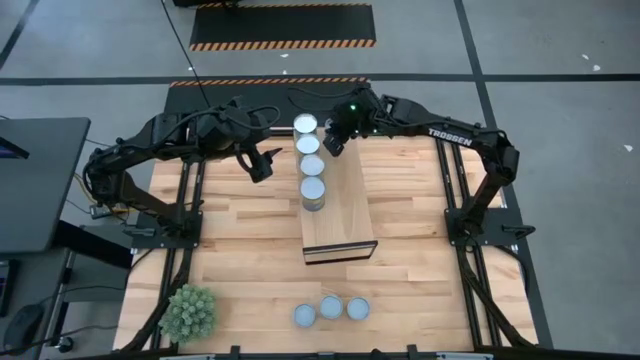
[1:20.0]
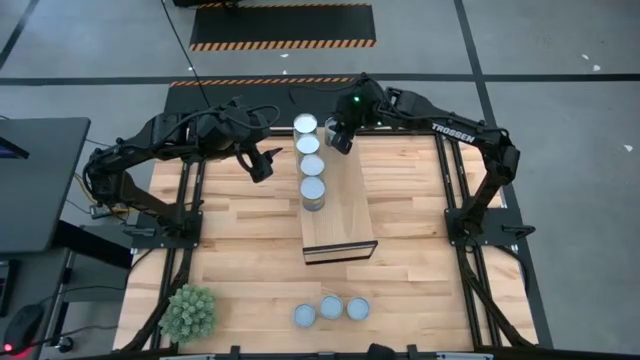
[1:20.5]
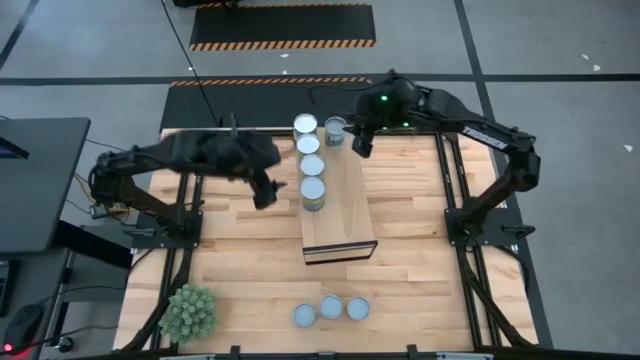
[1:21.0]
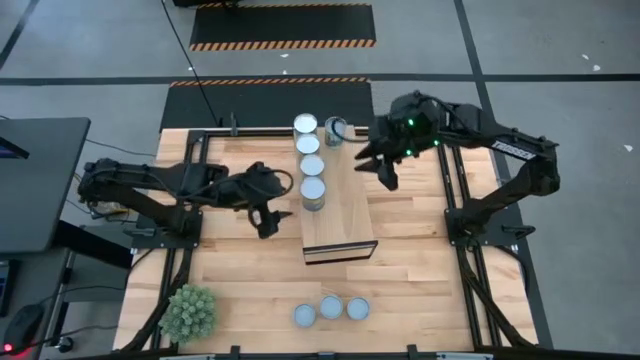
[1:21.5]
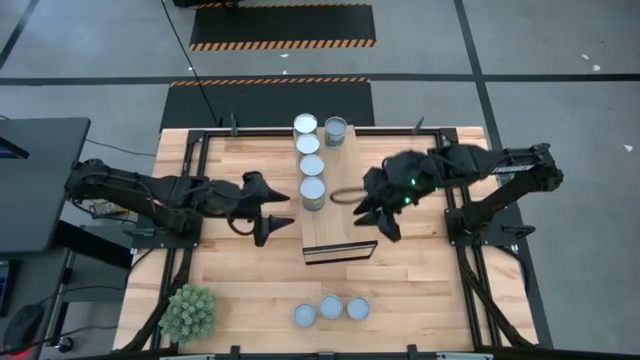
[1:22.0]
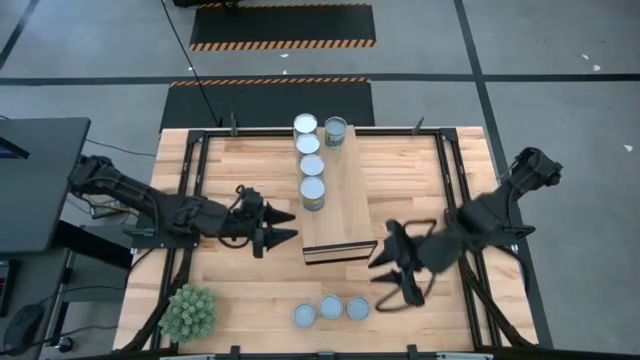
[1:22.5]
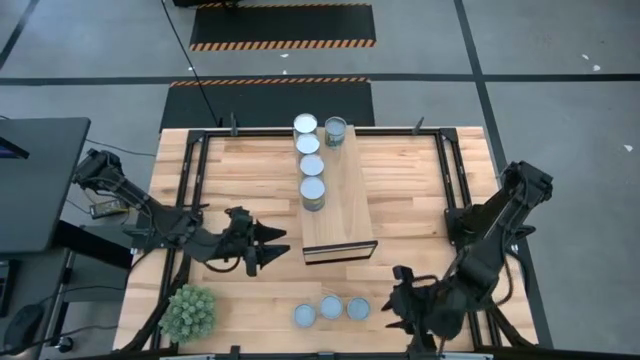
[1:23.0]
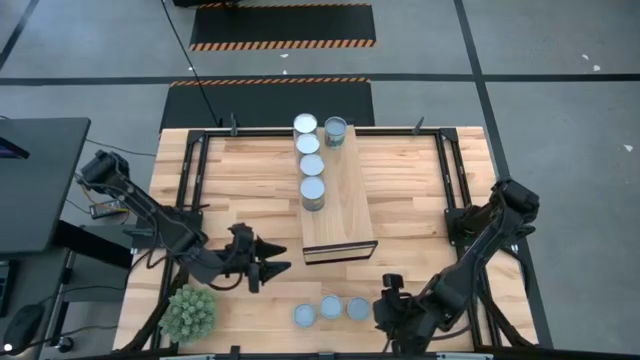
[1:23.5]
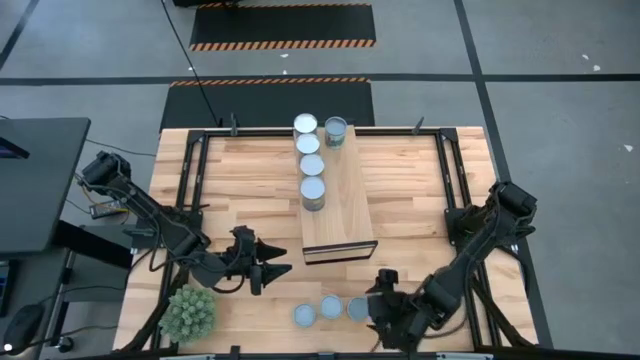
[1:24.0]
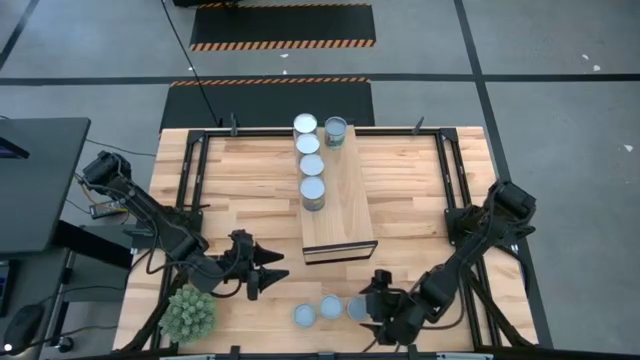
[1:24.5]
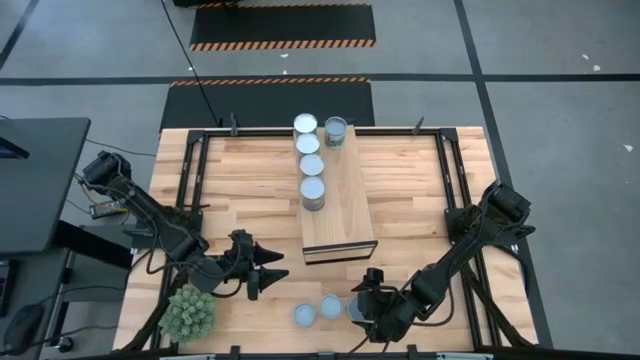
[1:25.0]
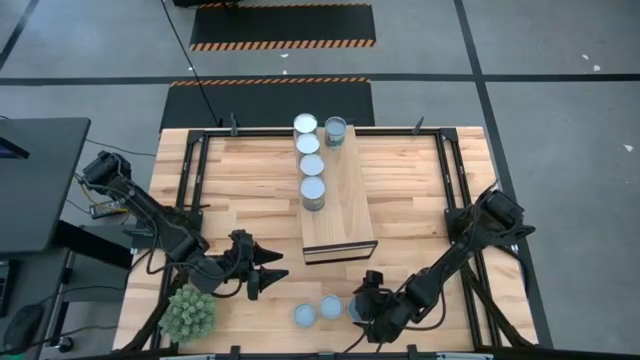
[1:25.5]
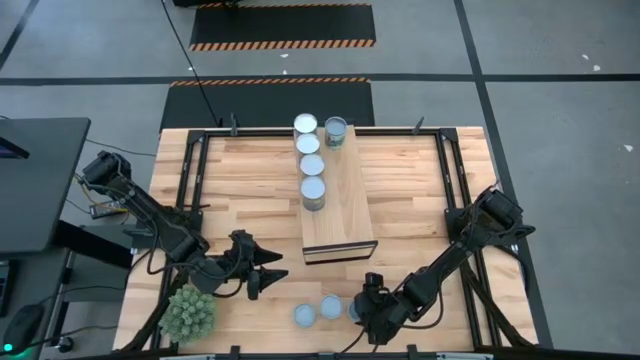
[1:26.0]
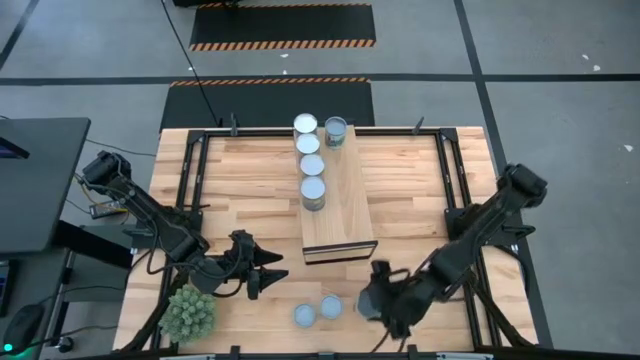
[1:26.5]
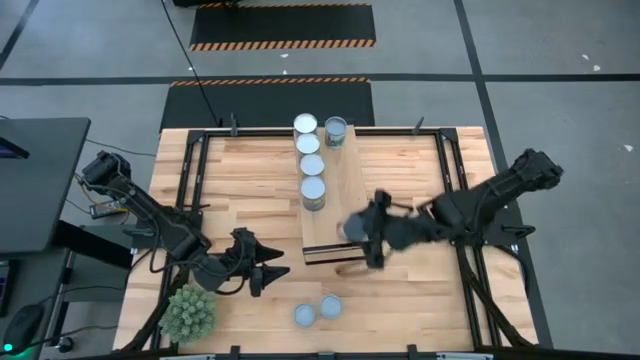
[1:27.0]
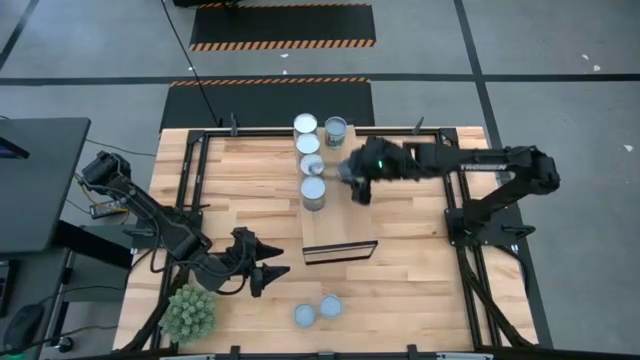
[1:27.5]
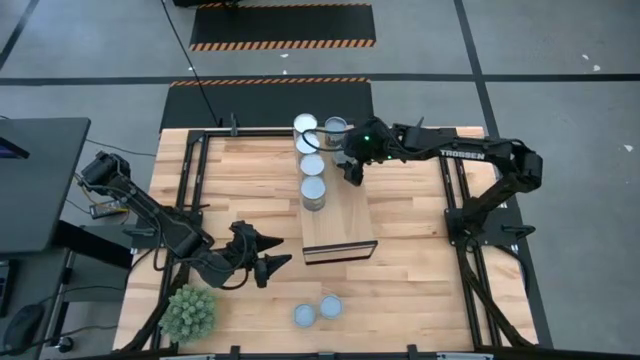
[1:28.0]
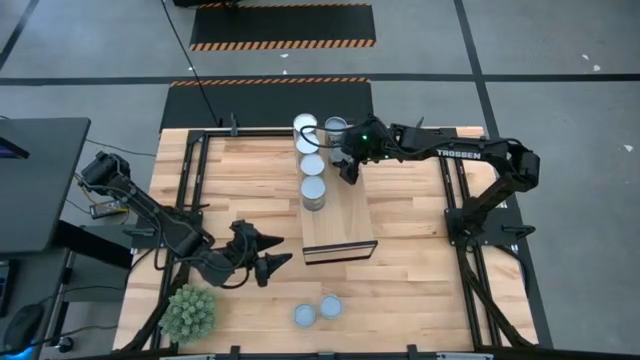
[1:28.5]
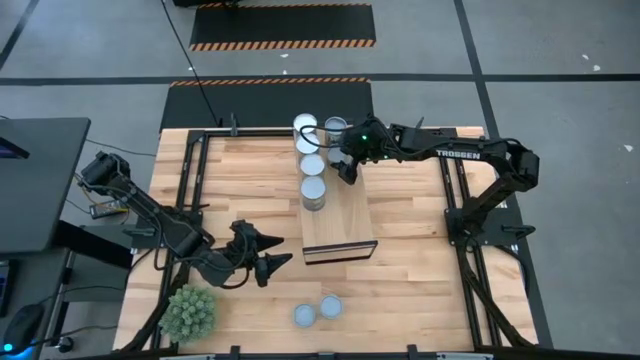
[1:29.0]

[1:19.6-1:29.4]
Task: Pick and place cans onto a shelf
Put the canned diced tomatoes on the shelf

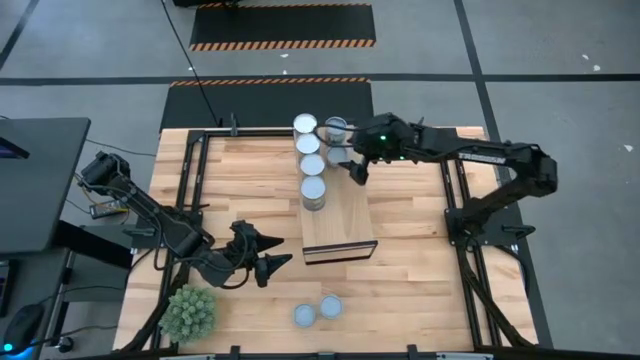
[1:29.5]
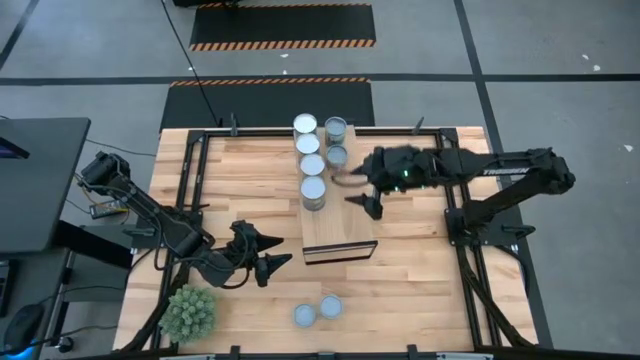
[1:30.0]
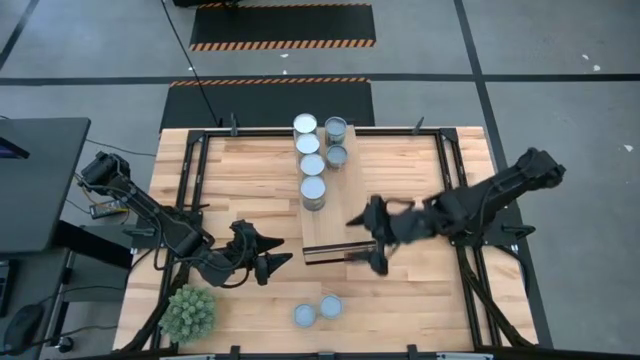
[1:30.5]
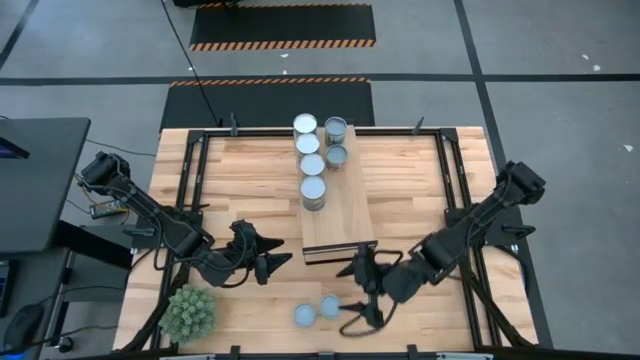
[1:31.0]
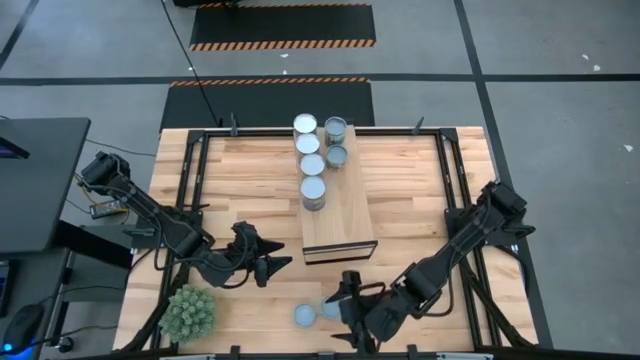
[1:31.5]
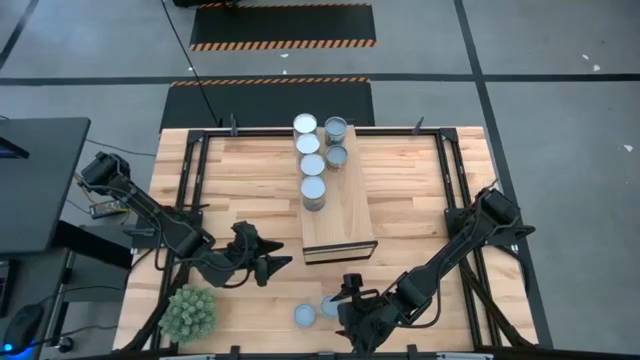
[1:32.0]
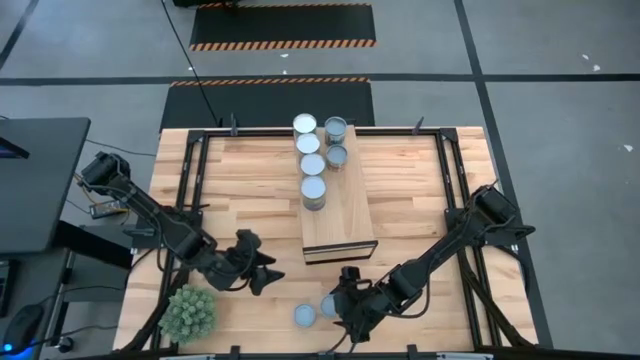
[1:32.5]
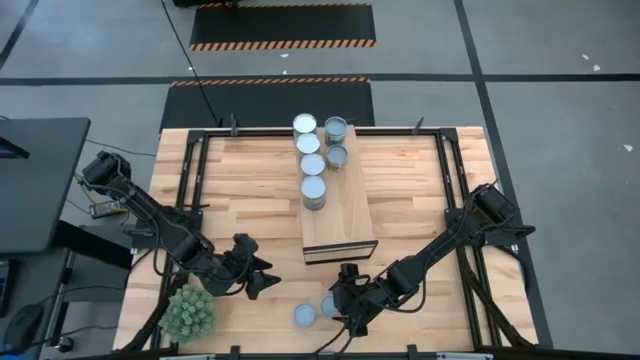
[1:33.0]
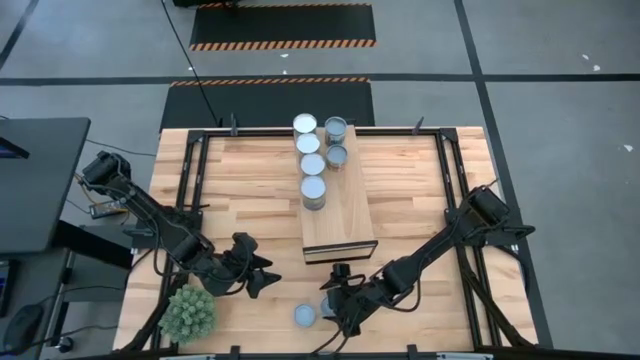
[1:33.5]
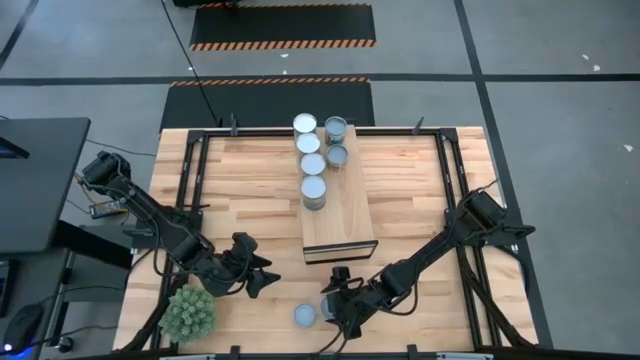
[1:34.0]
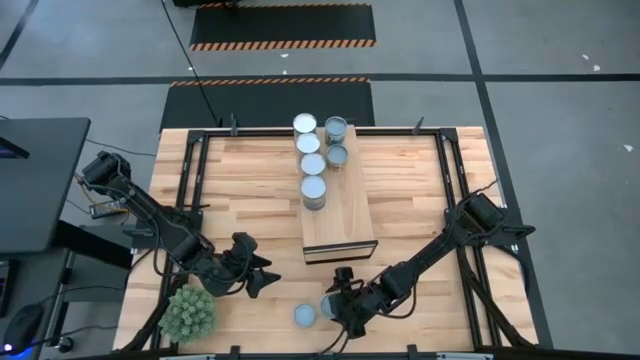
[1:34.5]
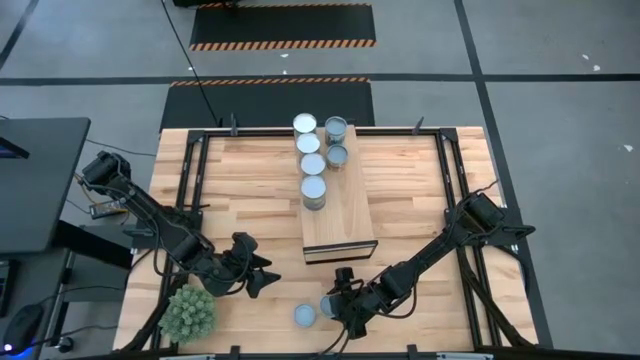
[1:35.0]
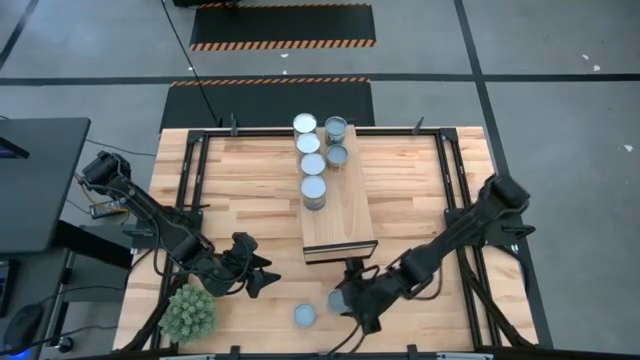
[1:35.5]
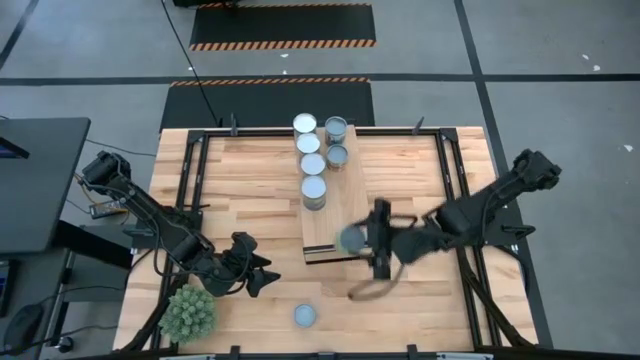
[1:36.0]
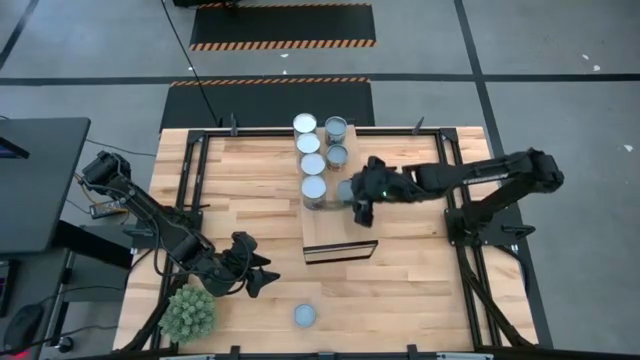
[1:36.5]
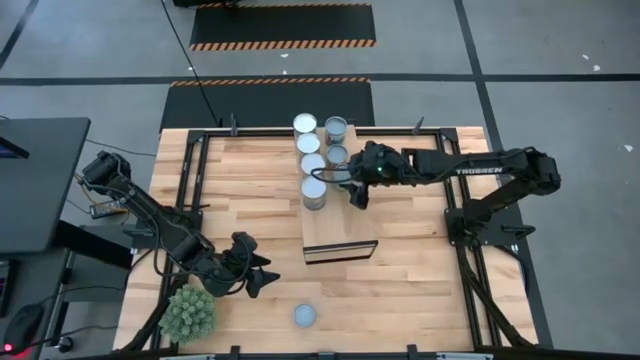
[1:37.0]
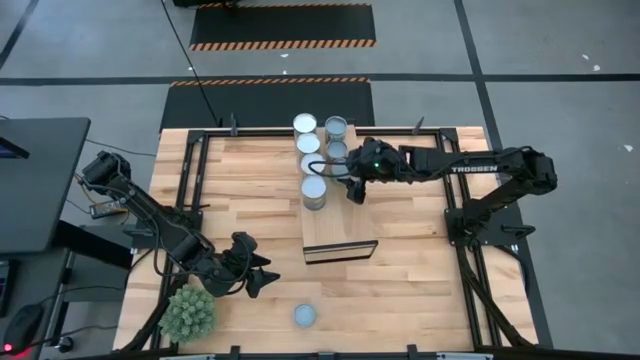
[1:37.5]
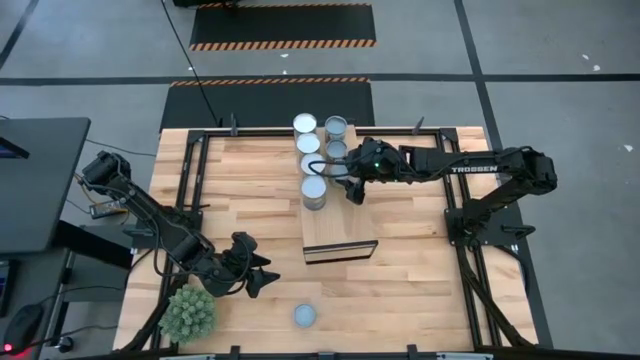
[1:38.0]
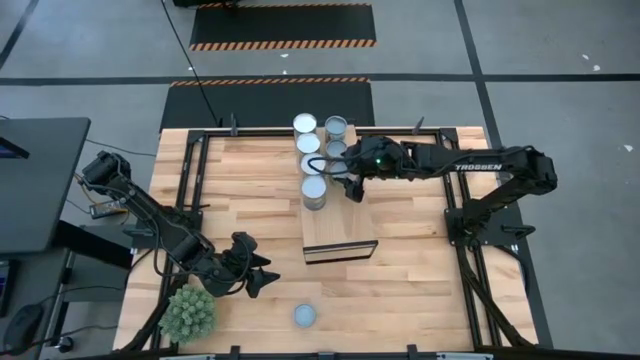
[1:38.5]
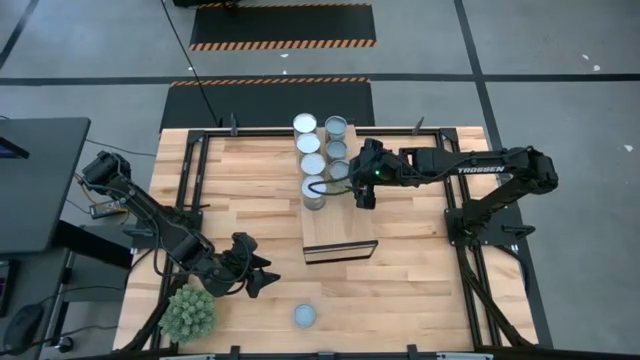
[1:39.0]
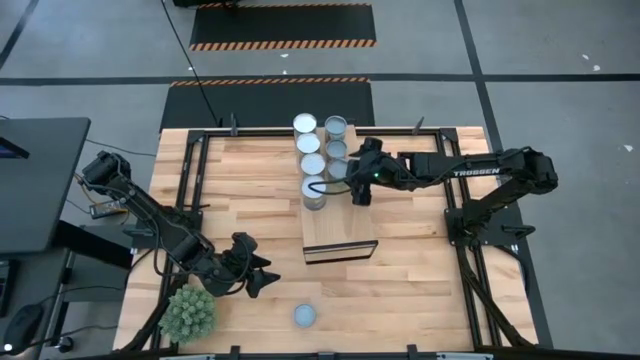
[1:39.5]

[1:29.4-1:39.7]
Put the small canned peas on the shelf

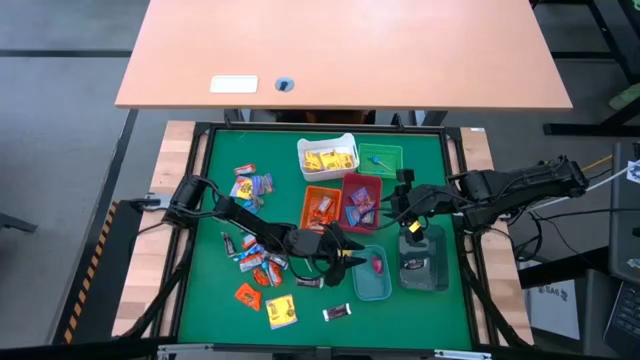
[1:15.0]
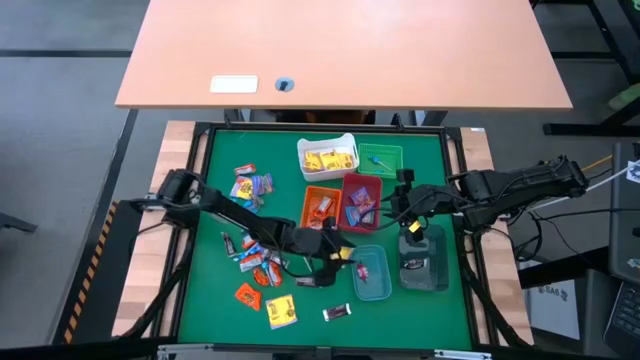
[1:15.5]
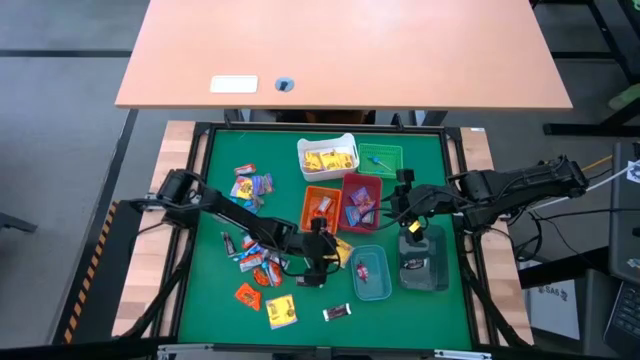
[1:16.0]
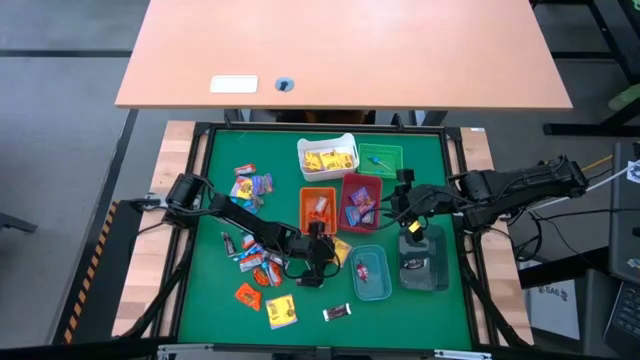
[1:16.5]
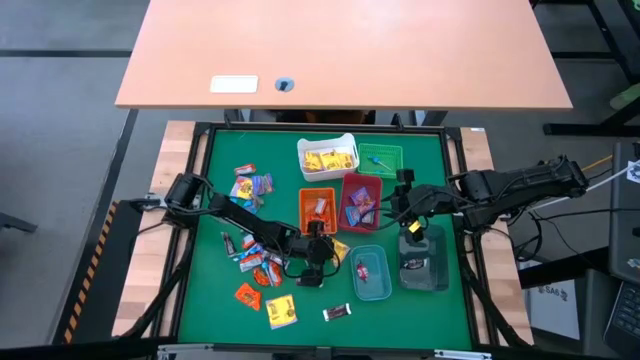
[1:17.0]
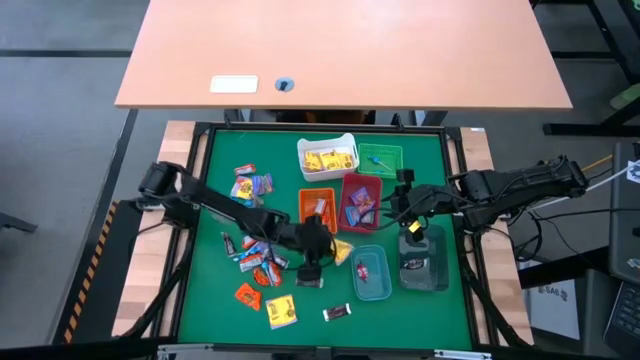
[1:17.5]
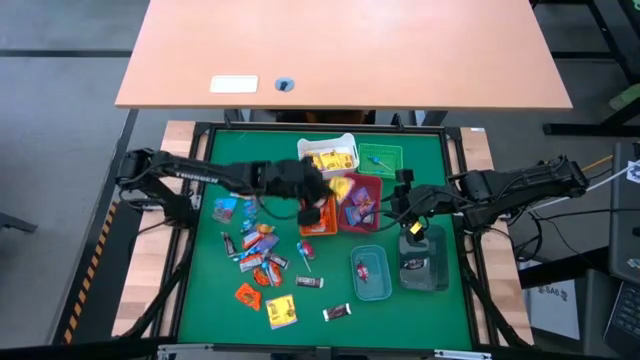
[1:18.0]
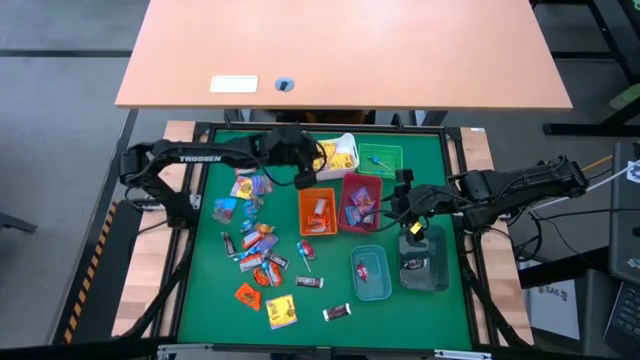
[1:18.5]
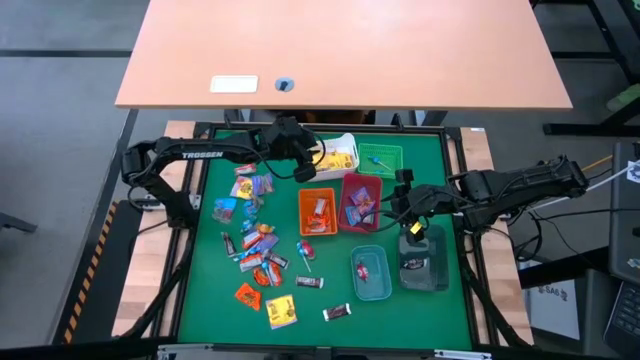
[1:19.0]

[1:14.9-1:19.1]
Task: Sort candy
Put the yellow bag of candy into the white bin
